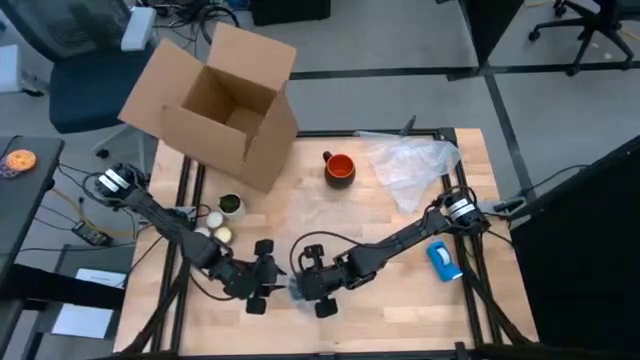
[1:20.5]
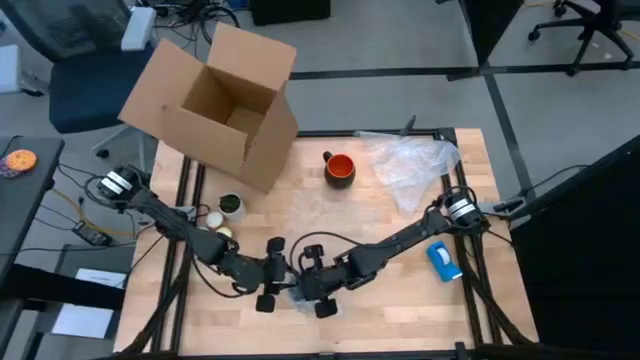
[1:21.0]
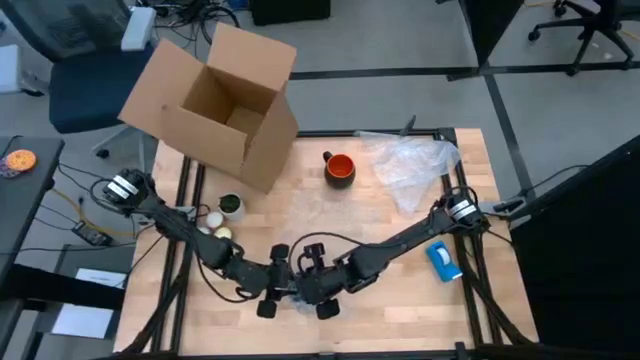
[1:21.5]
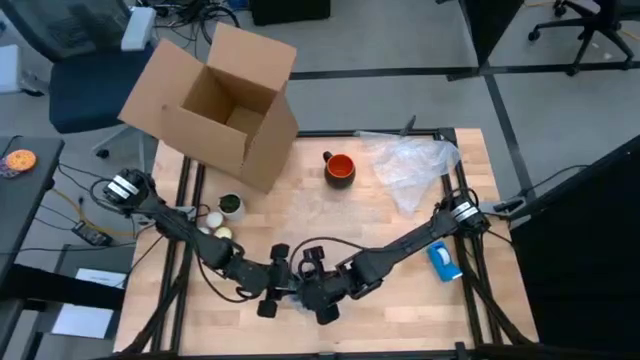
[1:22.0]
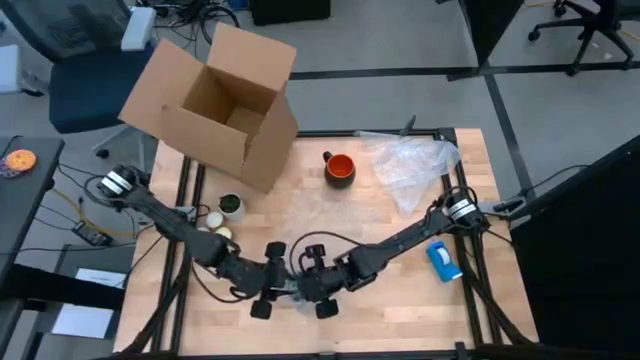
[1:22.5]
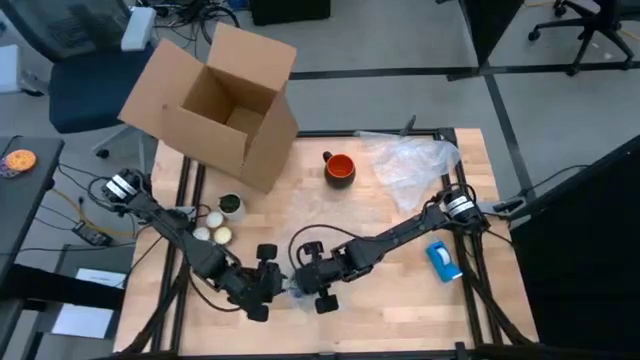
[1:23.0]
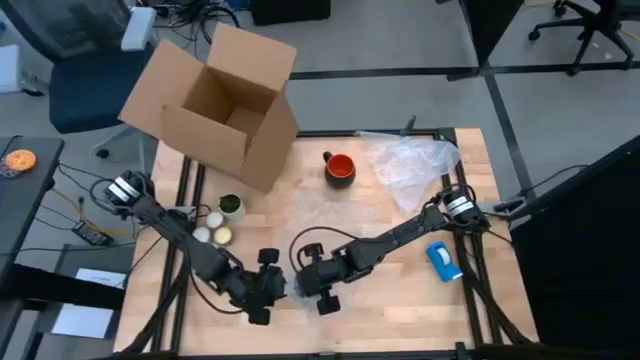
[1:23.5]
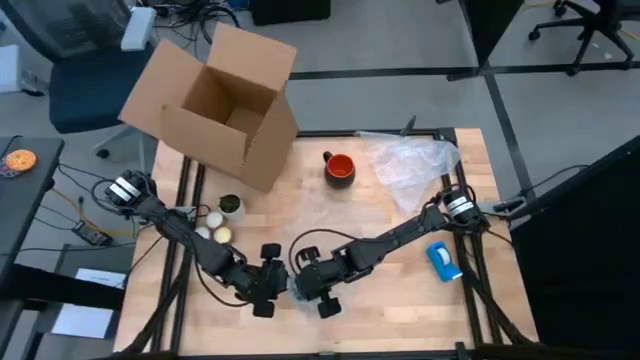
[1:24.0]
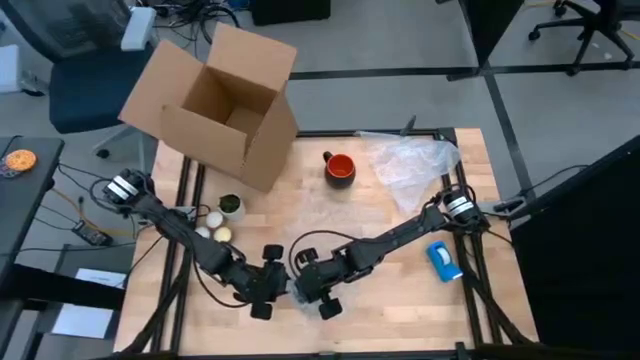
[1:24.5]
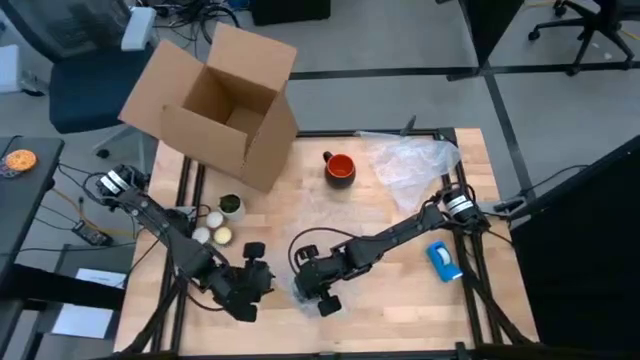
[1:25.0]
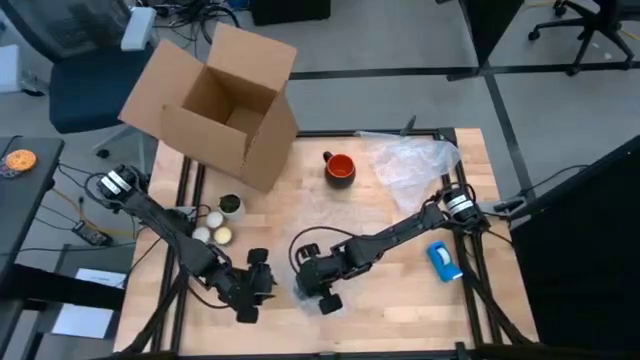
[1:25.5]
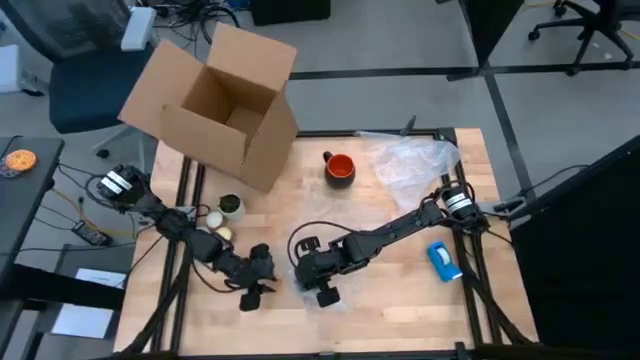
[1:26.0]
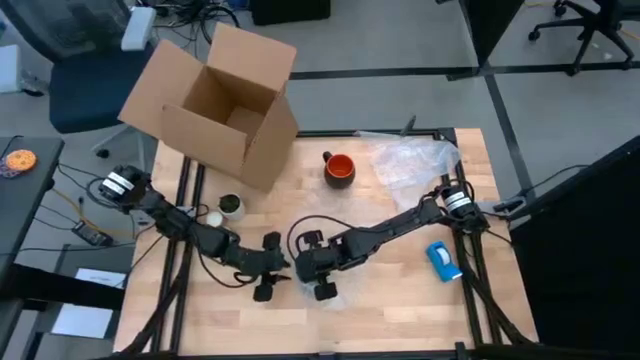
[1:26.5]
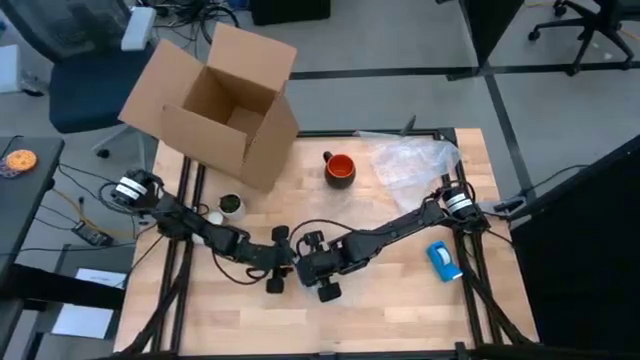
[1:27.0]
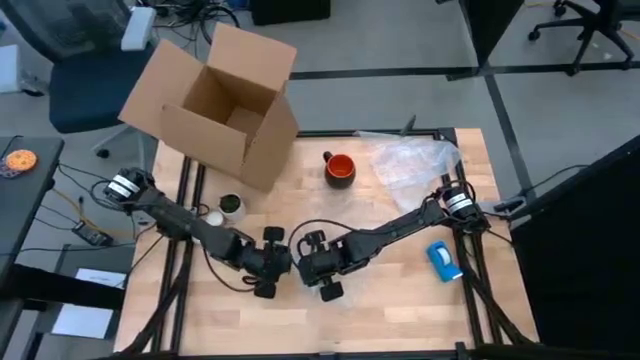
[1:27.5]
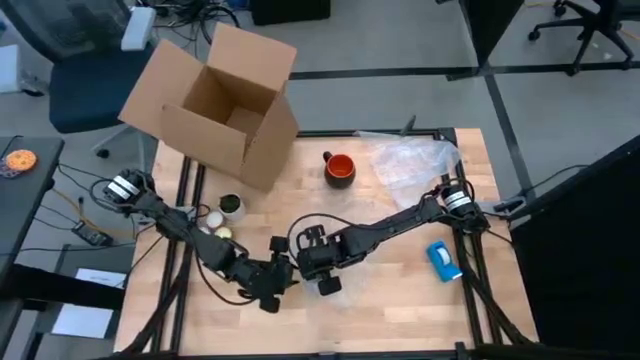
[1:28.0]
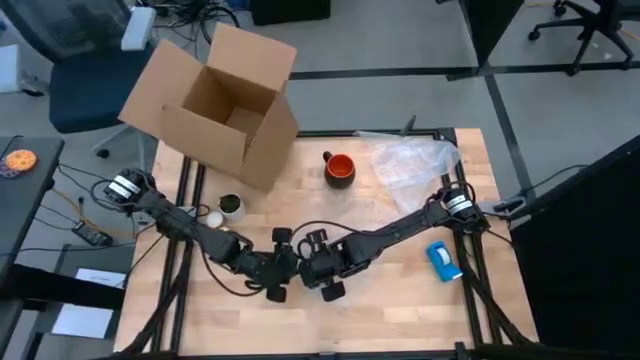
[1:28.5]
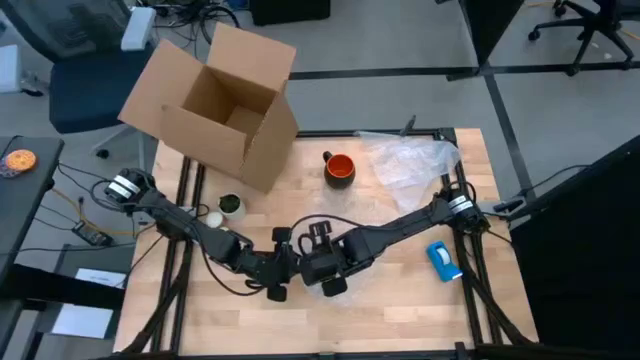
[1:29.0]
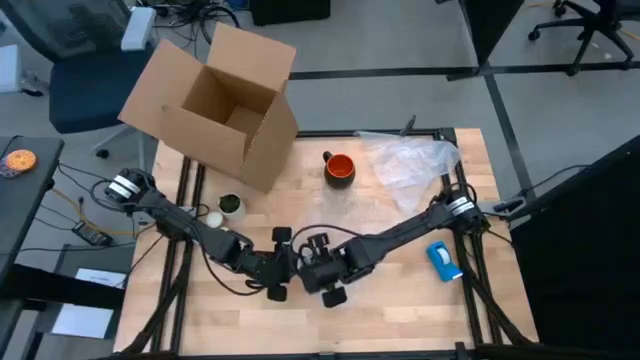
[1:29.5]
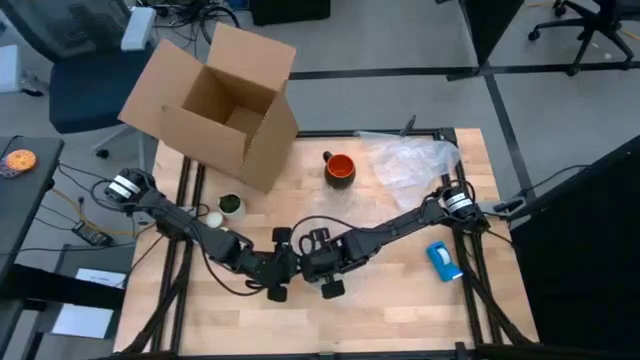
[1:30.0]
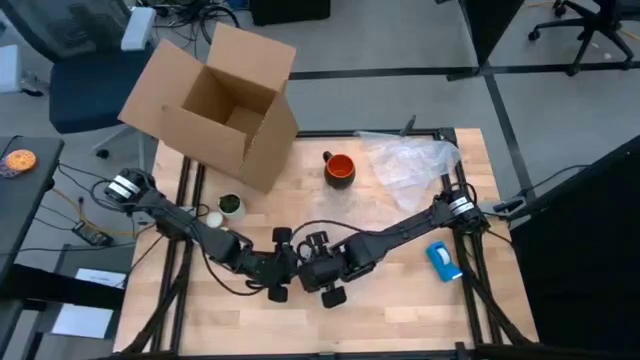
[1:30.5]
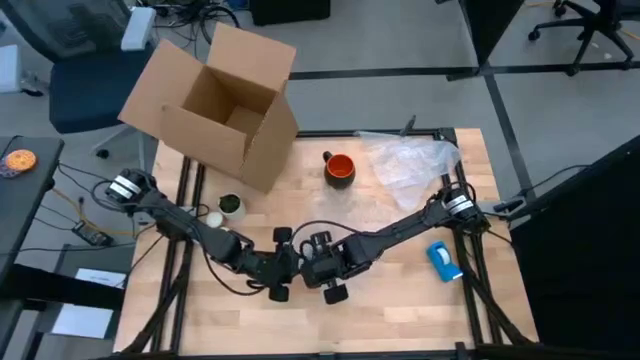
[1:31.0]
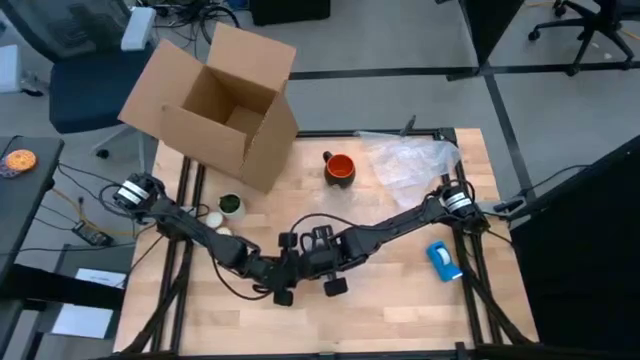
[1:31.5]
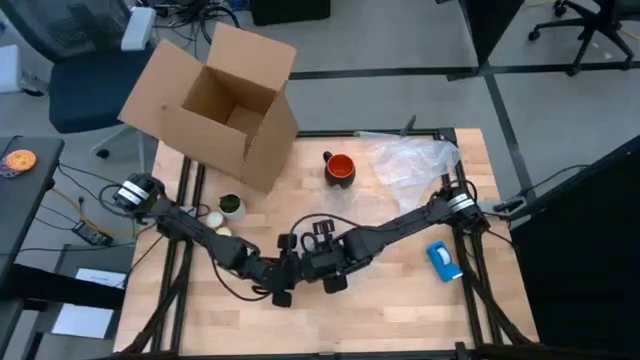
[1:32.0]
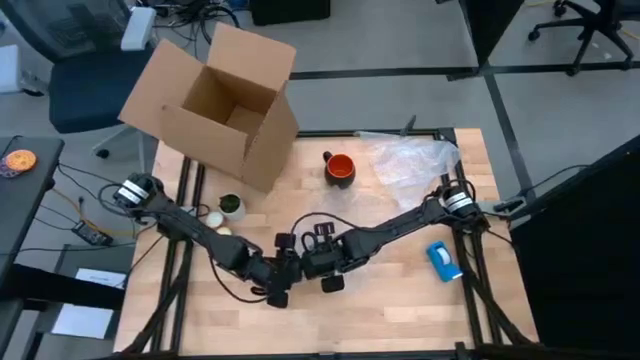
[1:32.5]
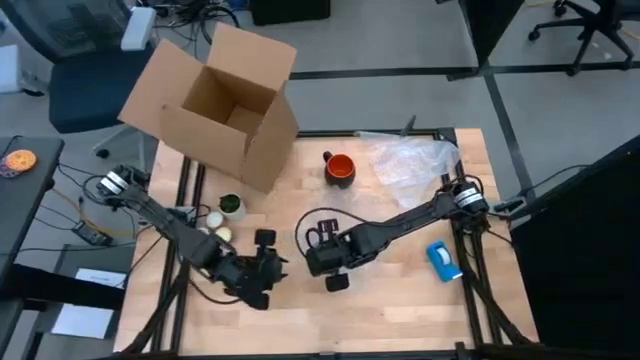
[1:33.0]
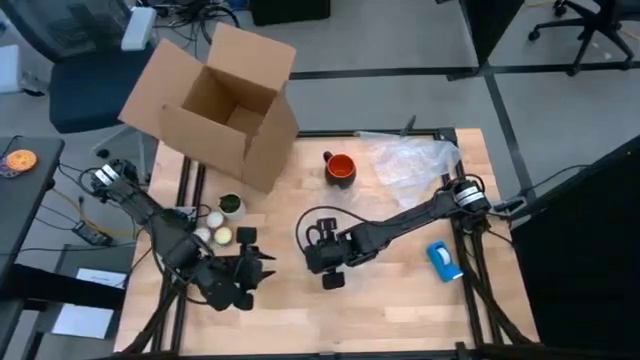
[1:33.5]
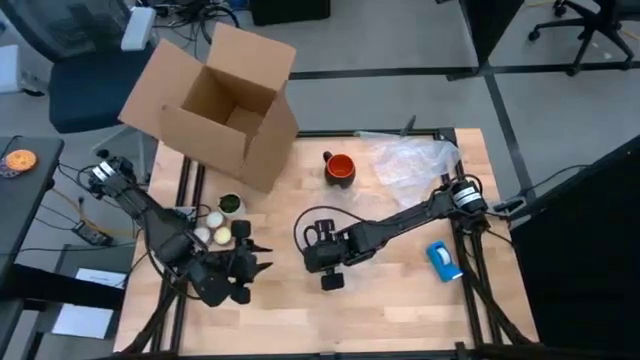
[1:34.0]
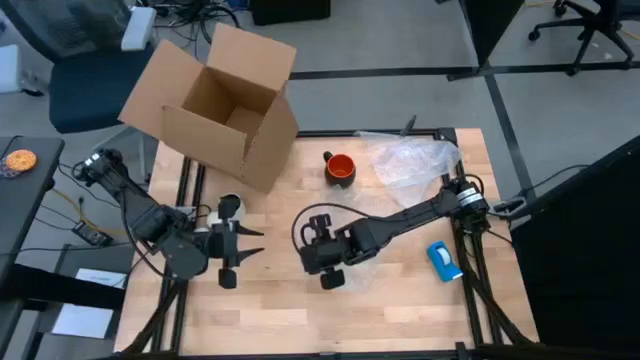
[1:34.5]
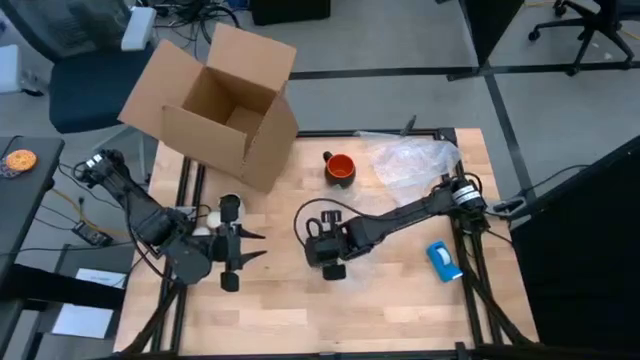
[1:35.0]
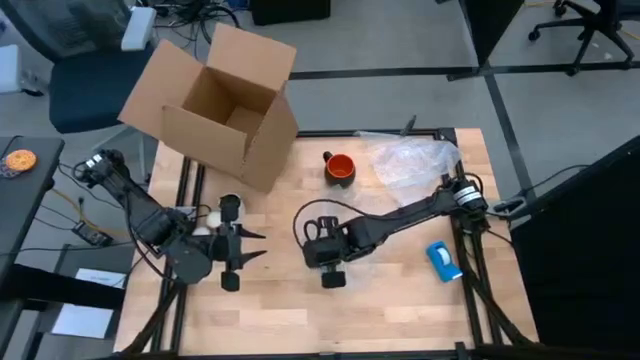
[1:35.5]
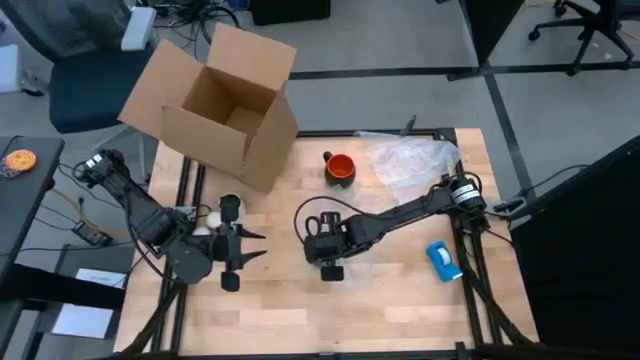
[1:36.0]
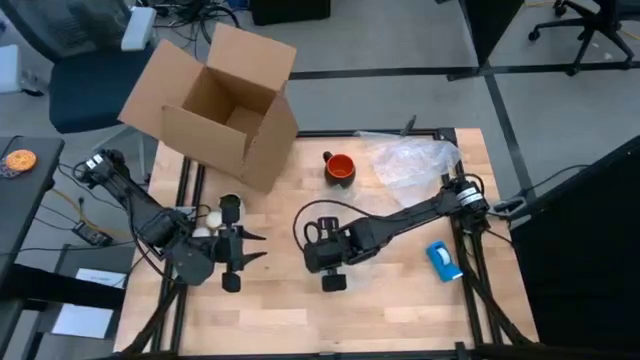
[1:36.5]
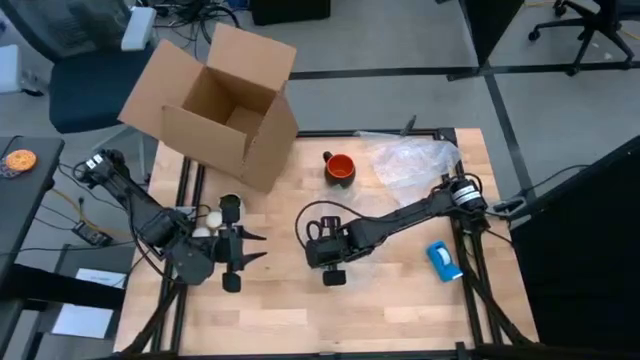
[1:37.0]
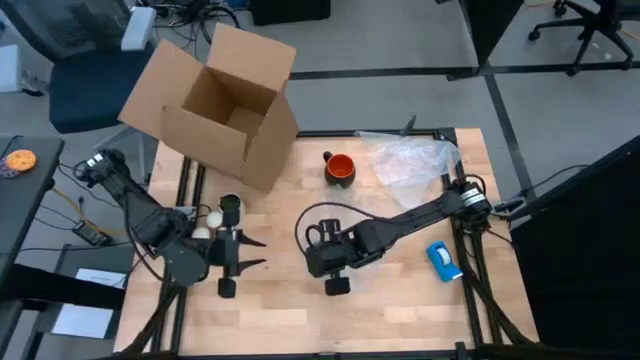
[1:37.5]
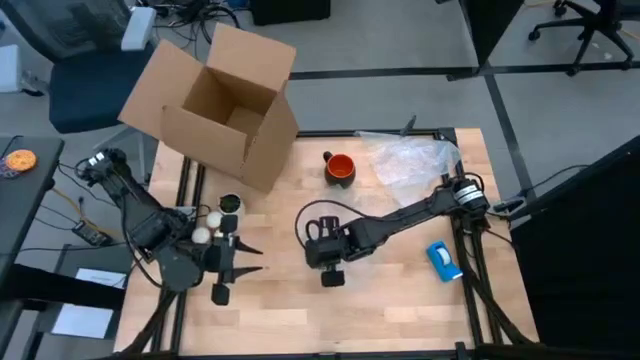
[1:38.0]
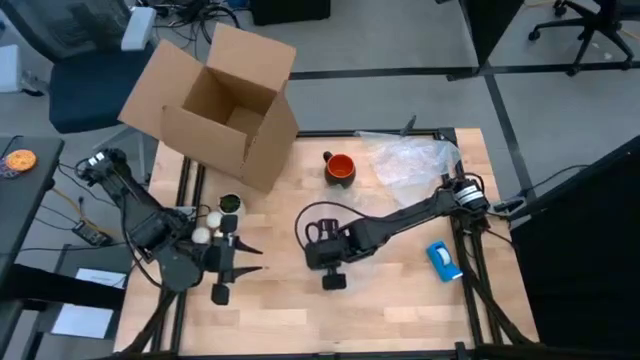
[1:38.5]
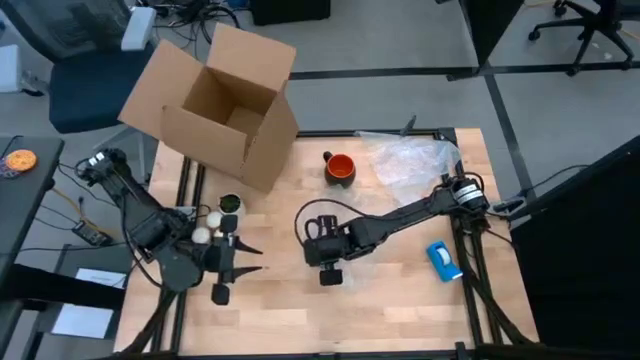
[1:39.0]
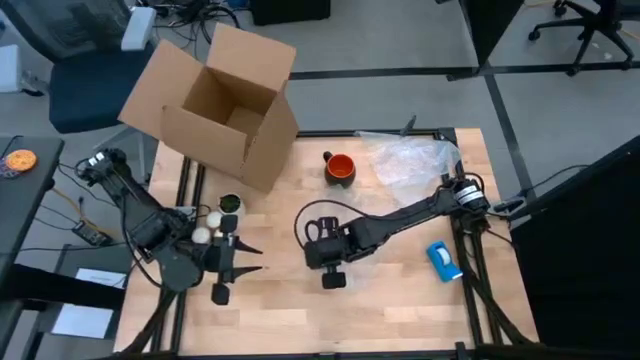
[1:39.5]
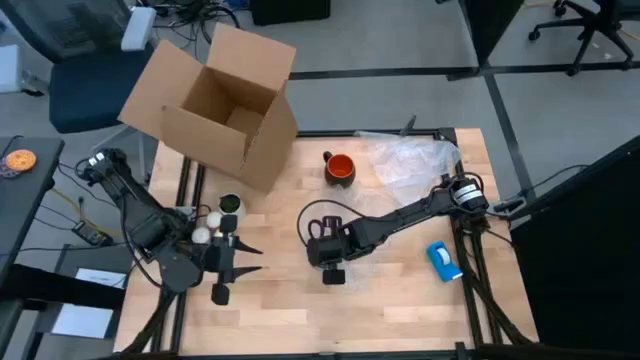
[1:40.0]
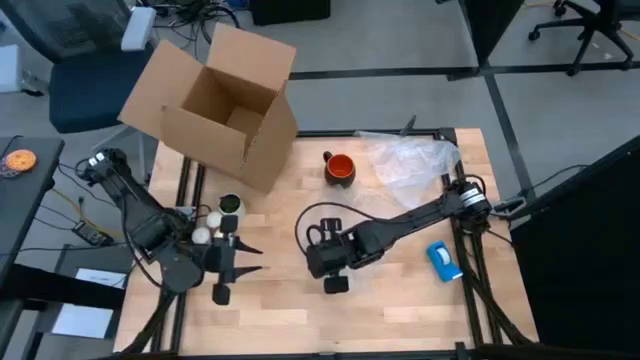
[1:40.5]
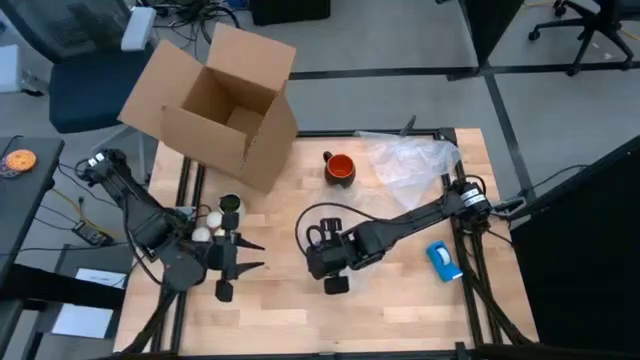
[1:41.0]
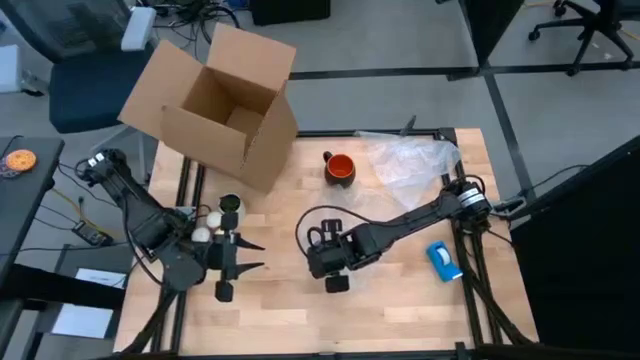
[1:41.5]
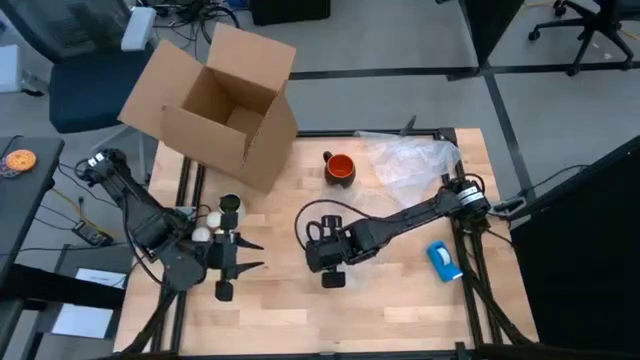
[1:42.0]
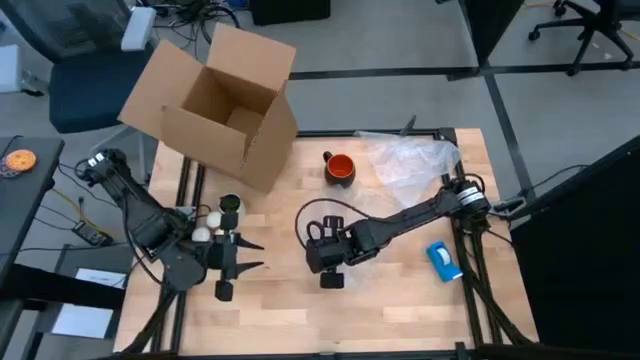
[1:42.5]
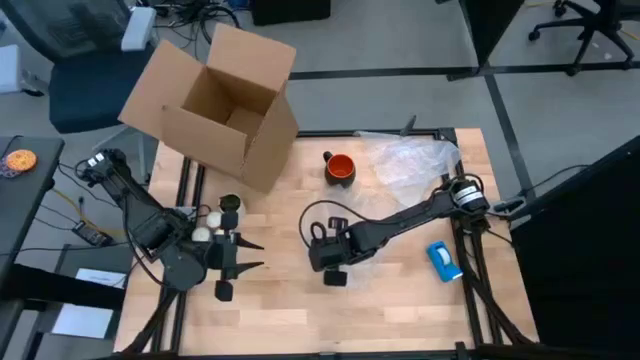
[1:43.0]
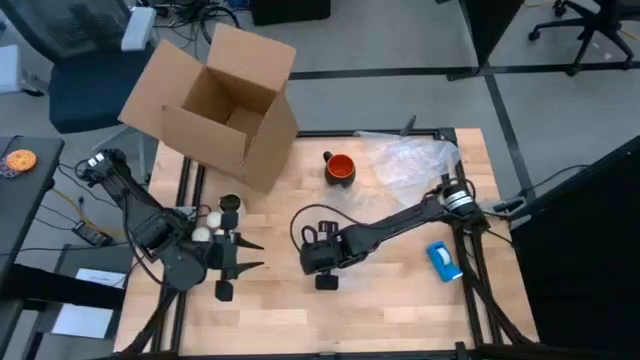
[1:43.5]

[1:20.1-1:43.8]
Task: wrap mug
Wrap the blue mug with bubble wrap
